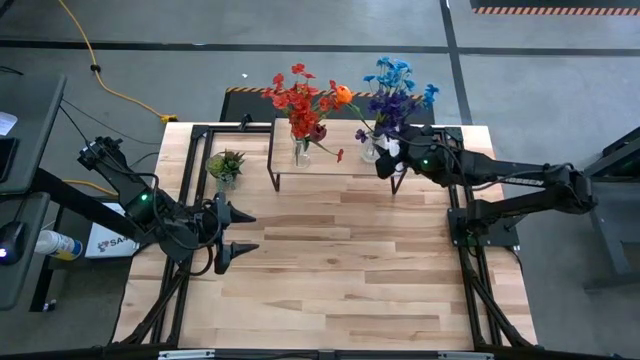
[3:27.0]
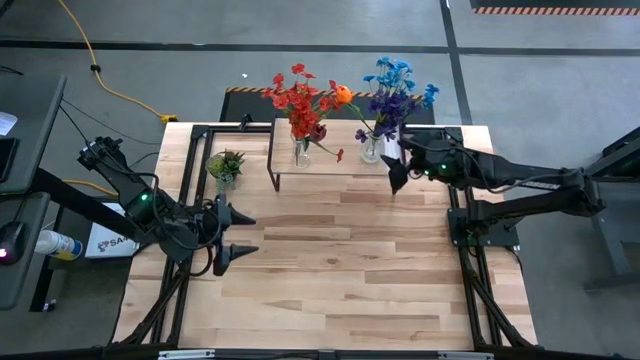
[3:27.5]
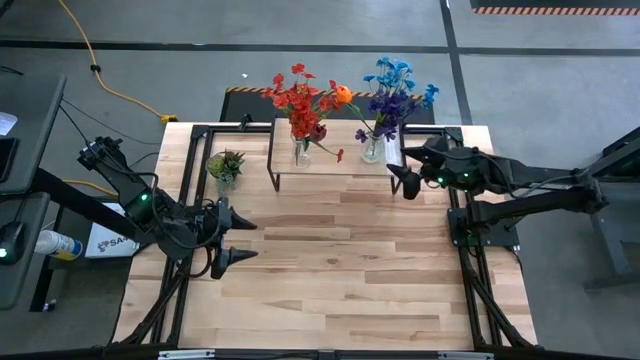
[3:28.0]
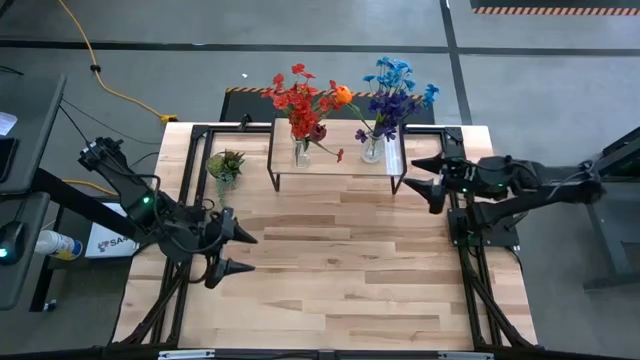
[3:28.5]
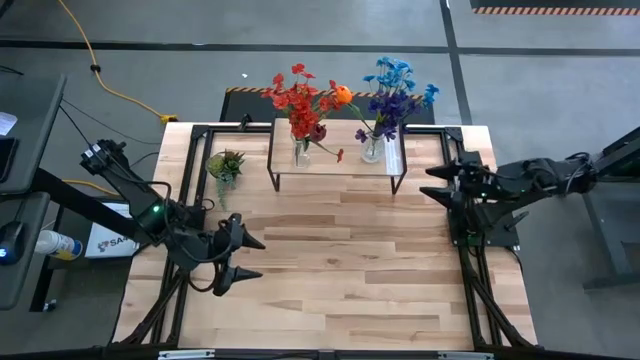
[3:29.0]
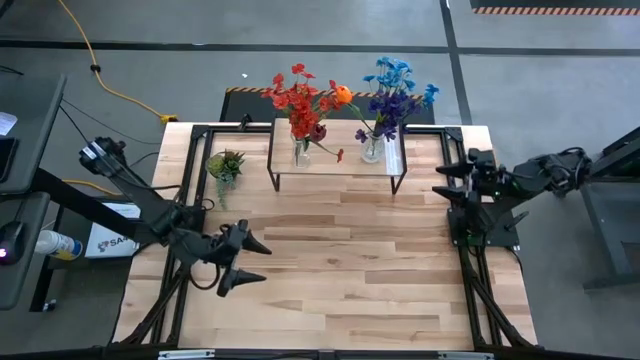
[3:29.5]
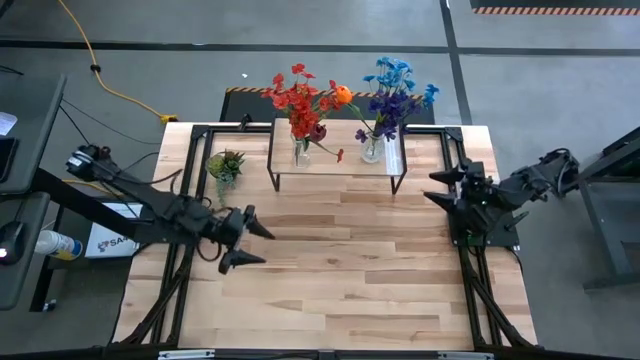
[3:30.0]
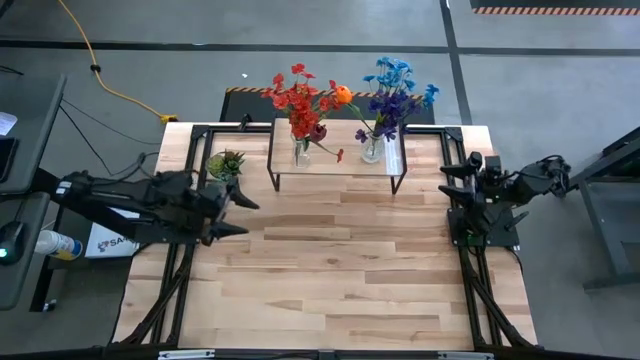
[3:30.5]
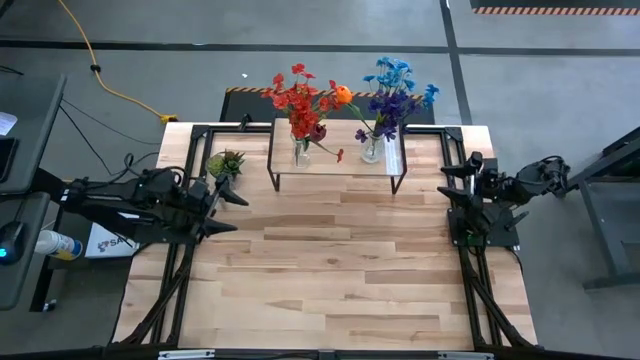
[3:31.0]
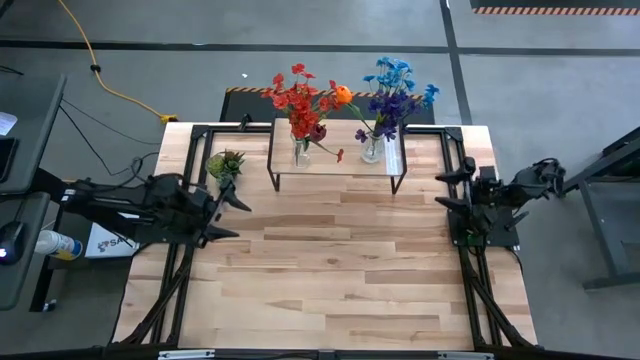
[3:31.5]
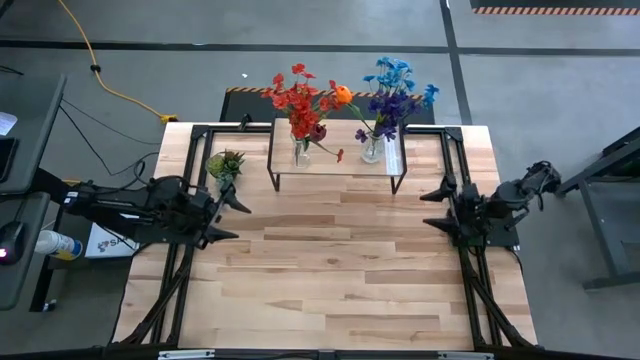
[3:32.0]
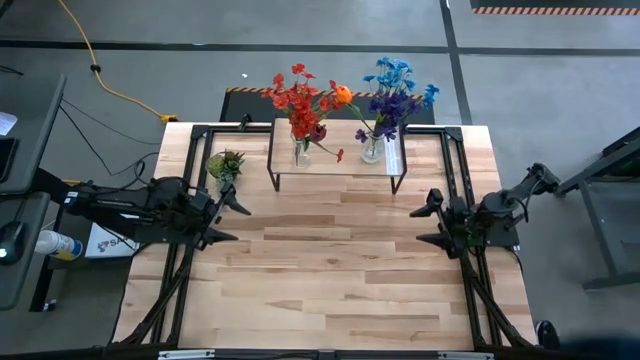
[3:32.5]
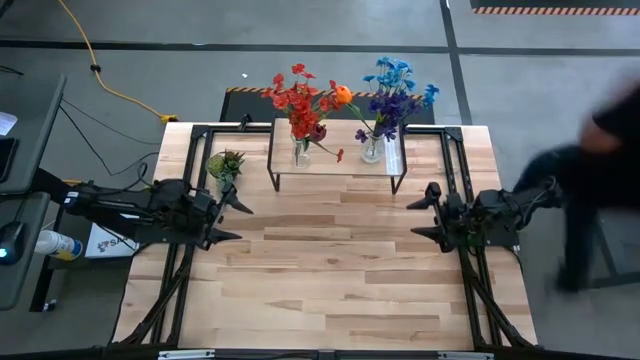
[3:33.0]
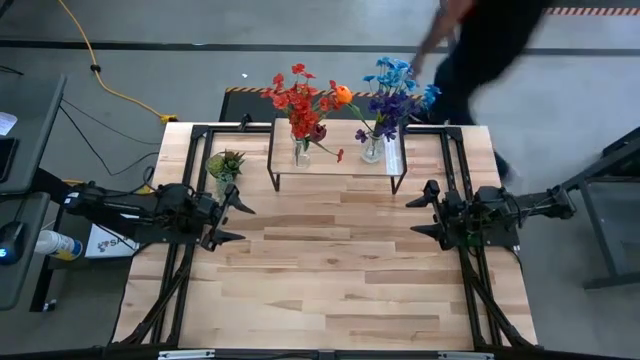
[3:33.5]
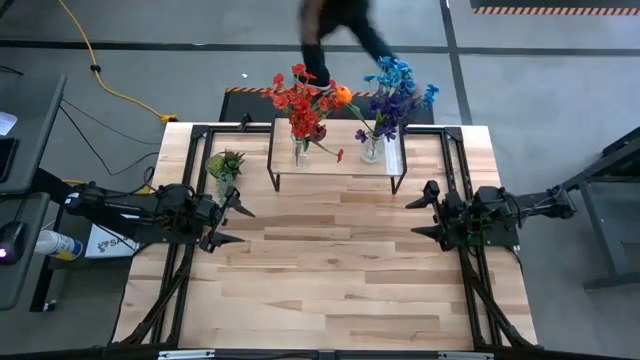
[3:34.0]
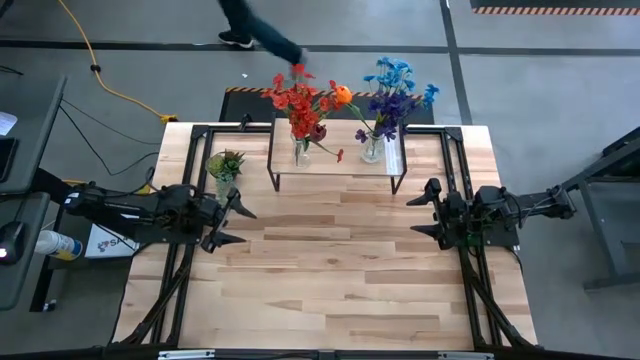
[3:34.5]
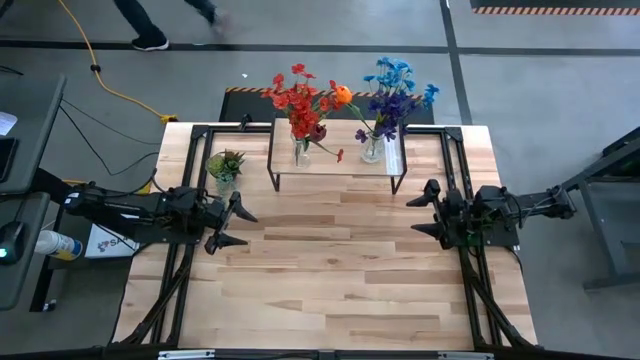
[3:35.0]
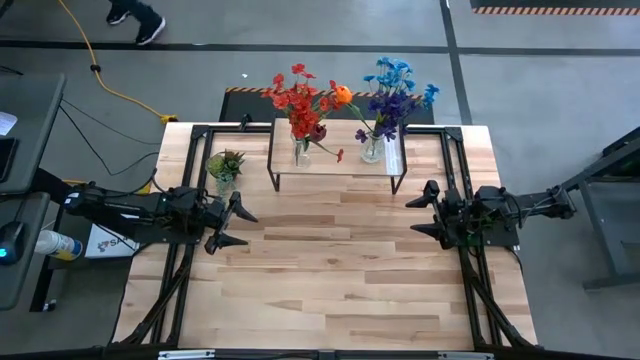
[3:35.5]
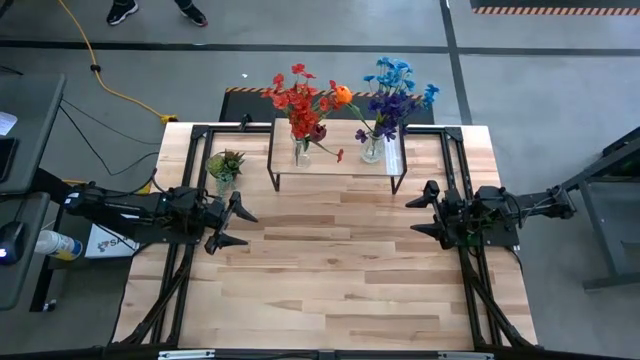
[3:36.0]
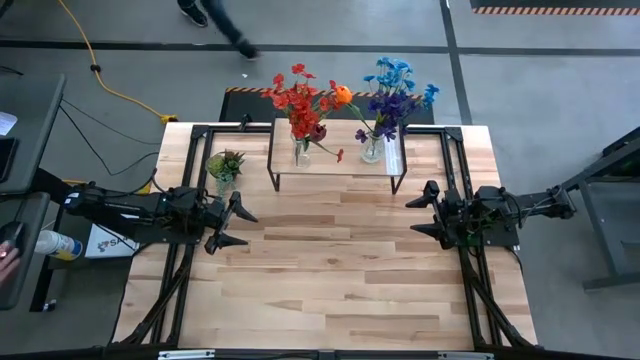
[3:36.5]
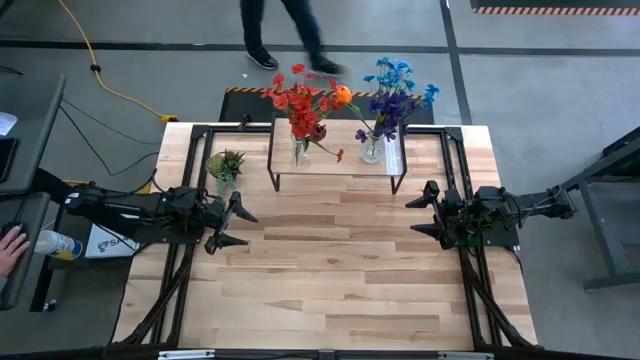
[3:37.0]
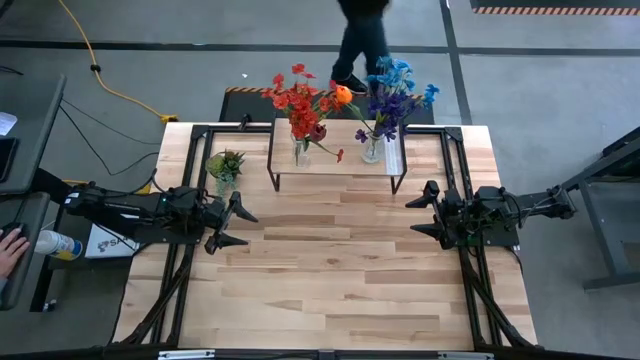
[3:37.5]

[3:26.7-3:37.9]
Task: Pick and place flowers into a vace then onto a shelf
Return to Home Position

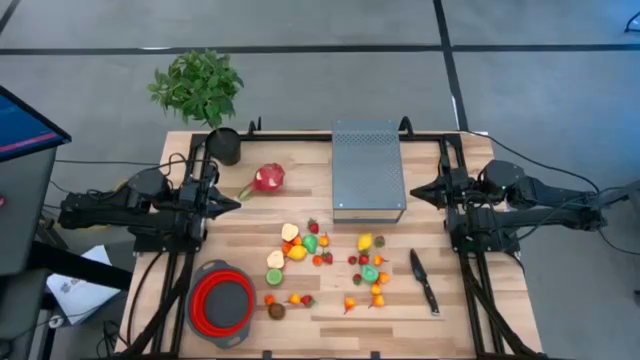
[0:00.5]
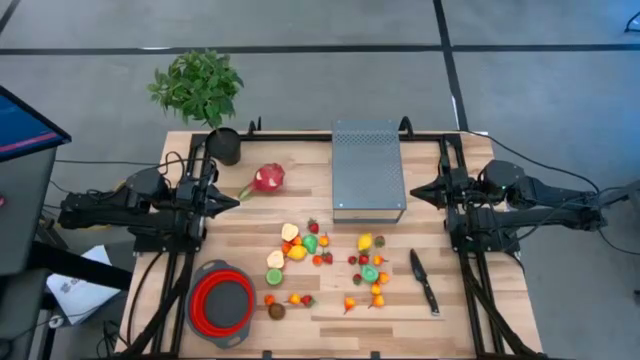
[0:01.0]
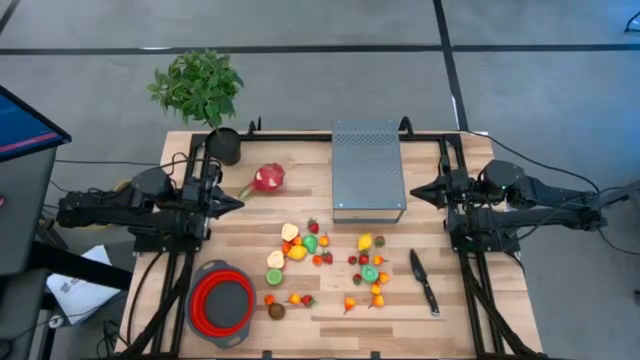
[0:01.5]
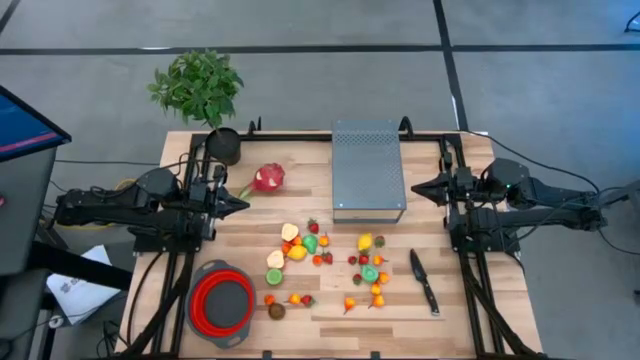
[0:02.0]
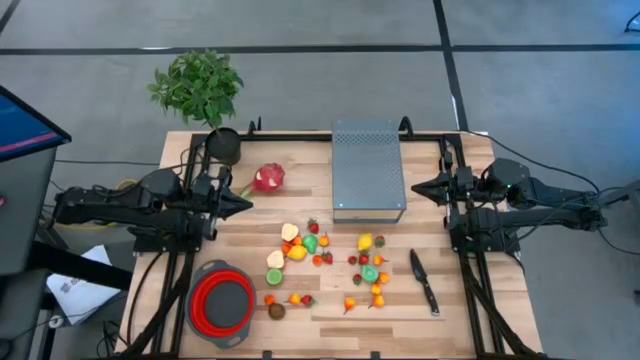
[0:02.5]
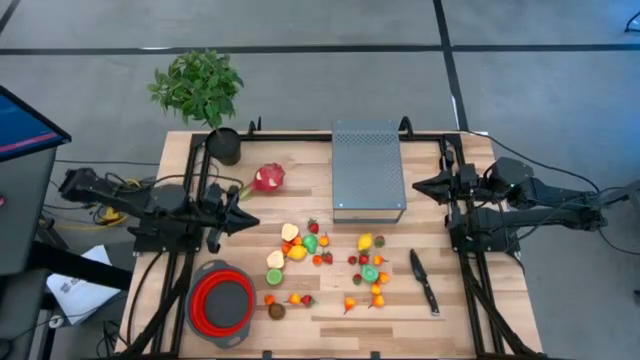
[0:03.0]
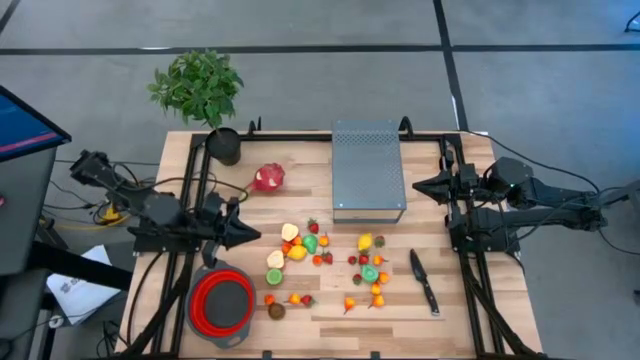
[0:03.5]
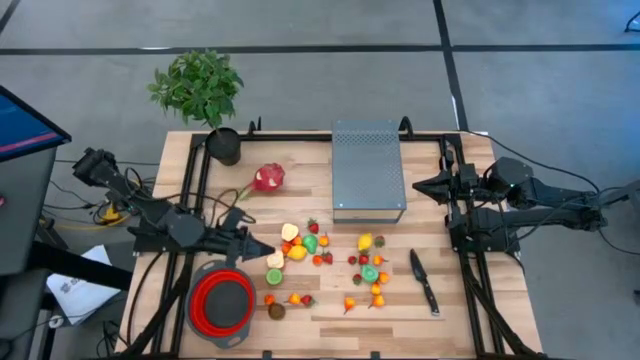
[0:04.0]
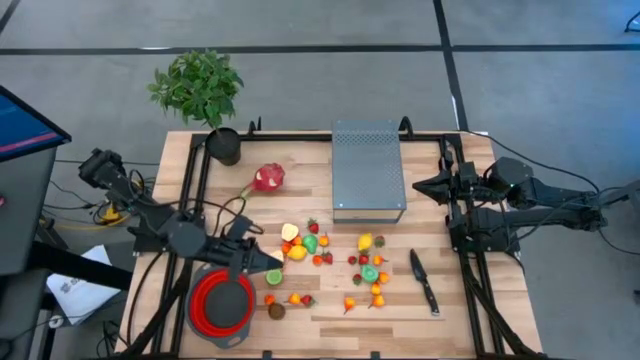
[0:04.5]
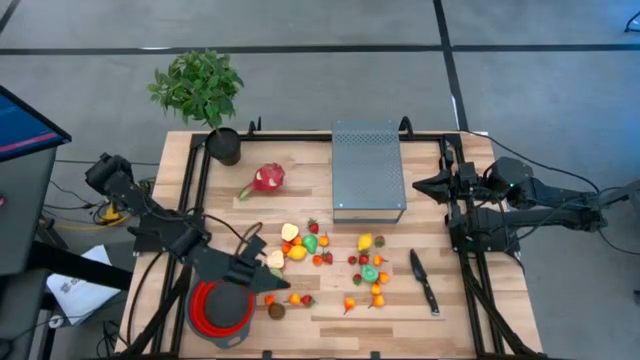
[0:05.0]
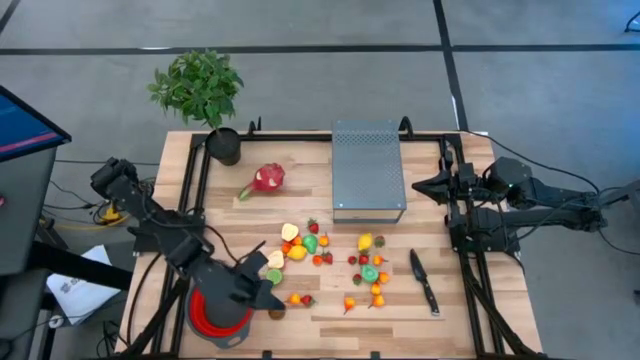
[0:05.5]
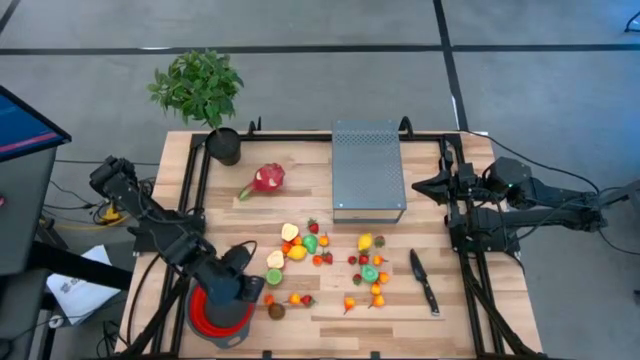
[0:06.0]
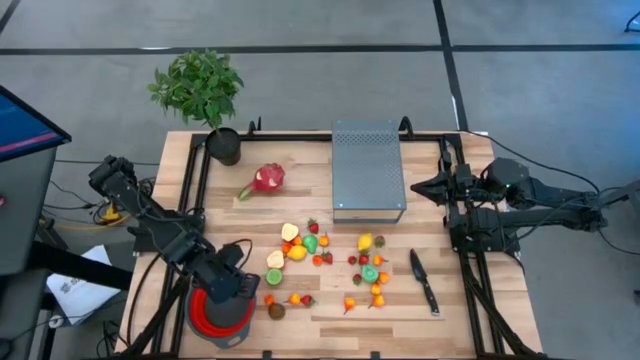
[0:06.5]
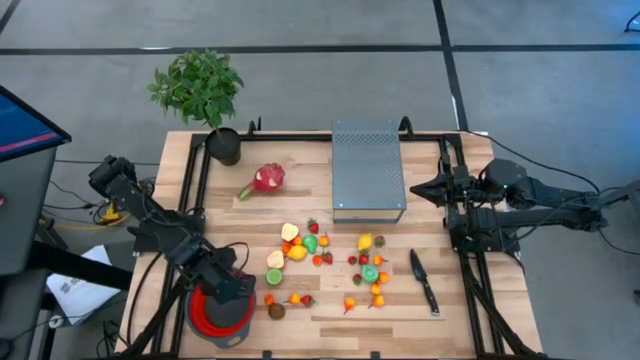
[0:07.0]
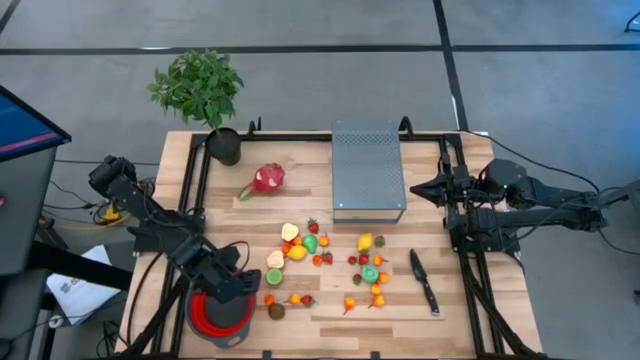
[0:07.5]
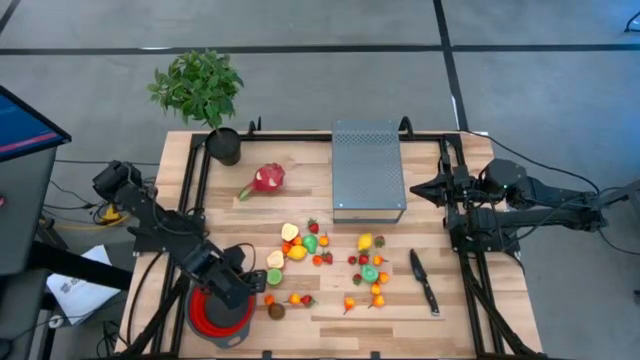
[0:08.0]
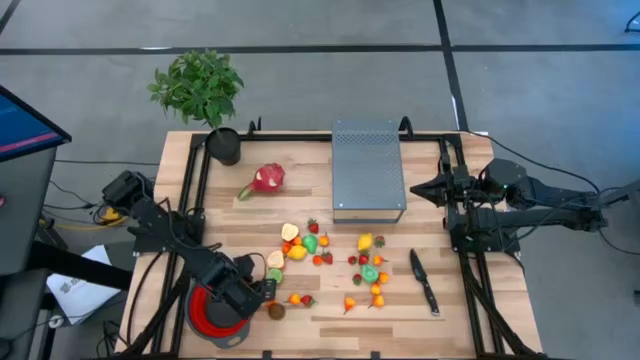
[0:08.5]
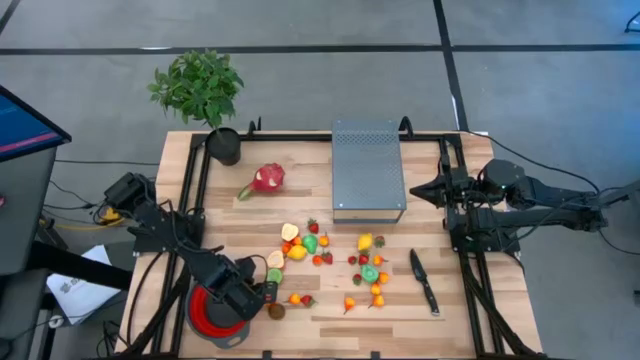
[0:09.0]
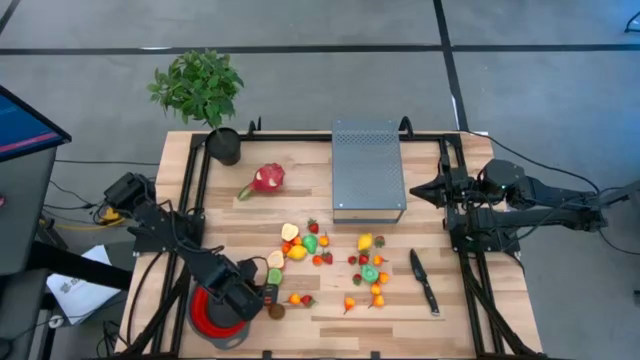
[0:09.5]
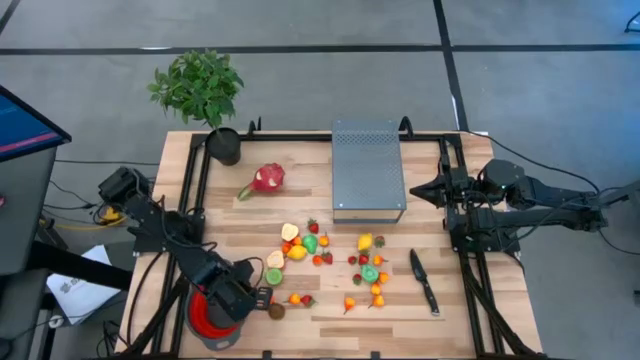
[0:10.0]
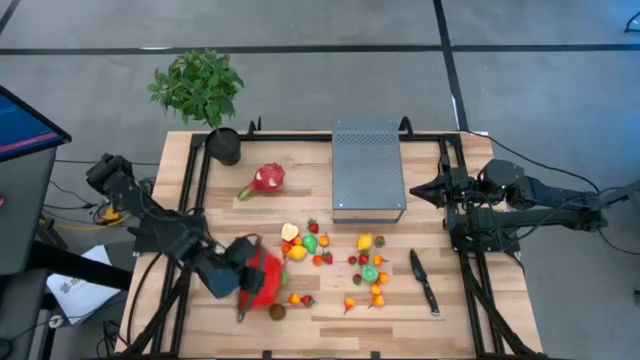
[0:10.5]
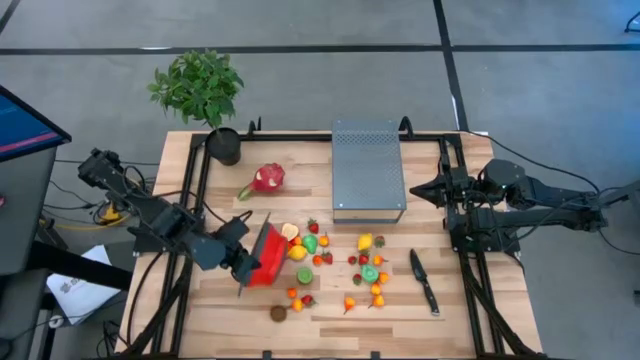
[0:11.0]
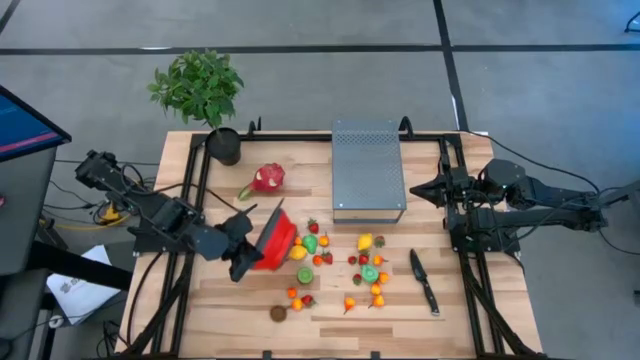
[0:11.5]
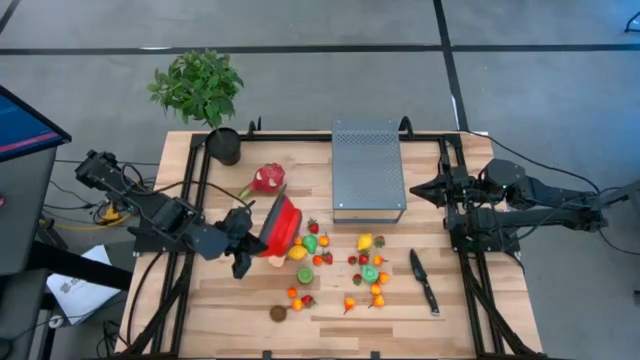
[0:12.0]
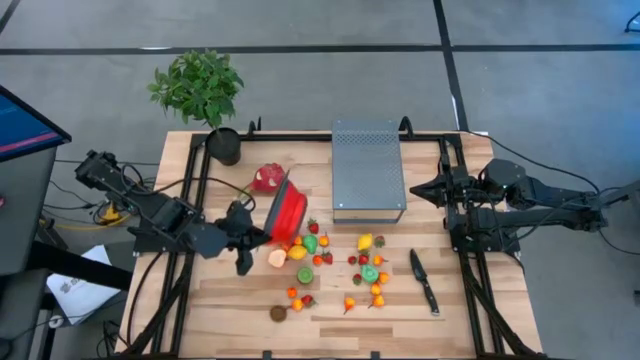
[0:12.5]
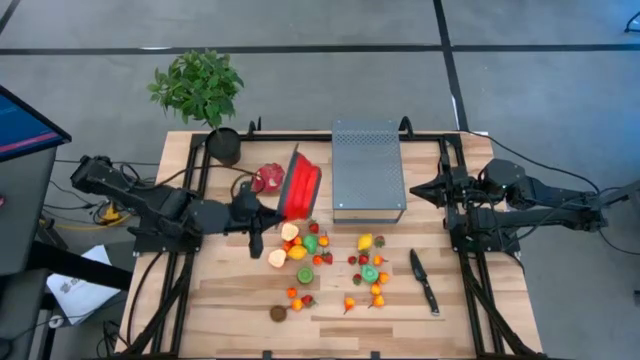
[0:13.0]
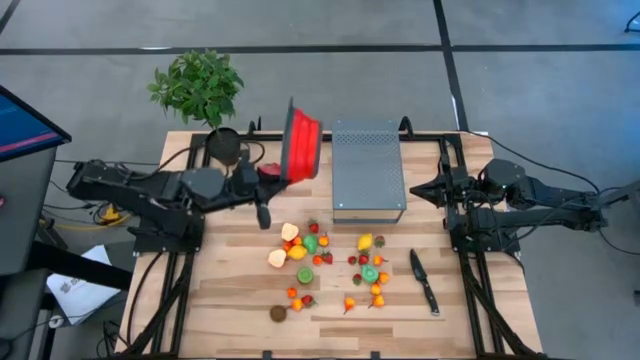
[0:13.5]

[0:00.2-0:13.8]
Task: Pick & Place Fruit
Put the red colander on the shelf
